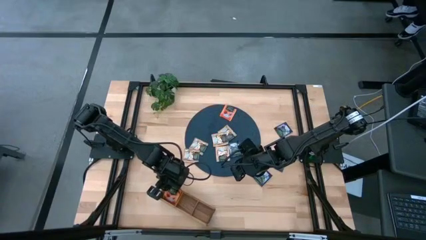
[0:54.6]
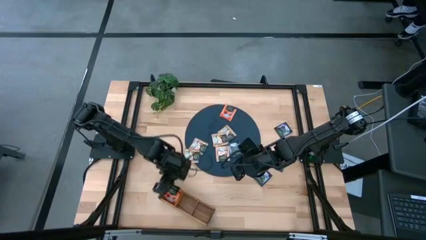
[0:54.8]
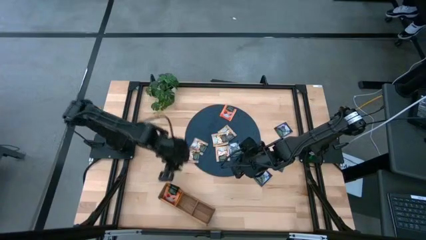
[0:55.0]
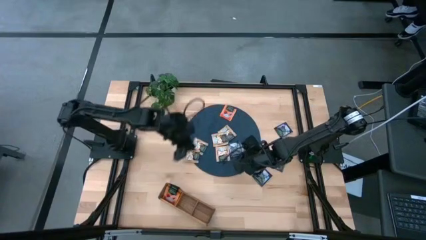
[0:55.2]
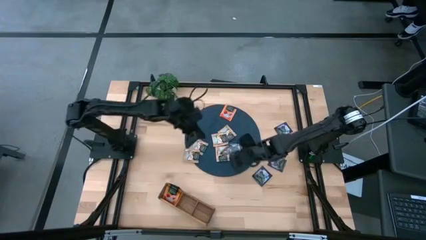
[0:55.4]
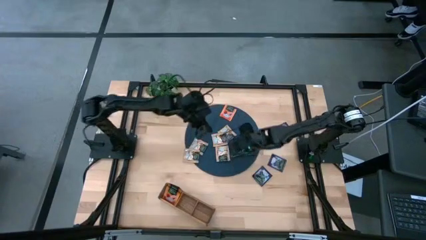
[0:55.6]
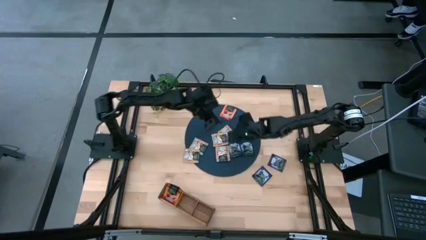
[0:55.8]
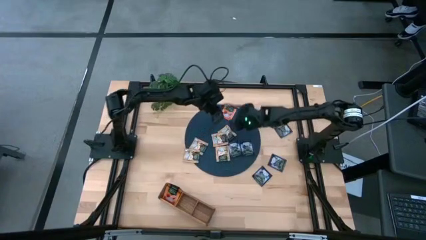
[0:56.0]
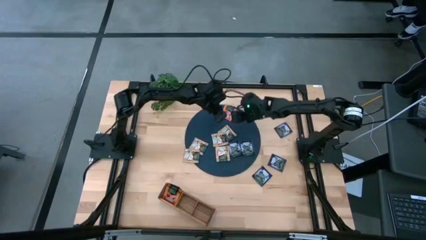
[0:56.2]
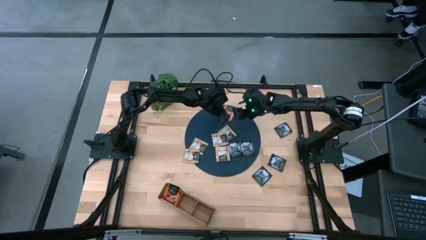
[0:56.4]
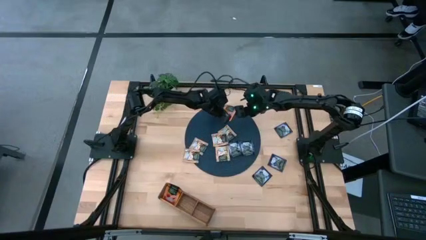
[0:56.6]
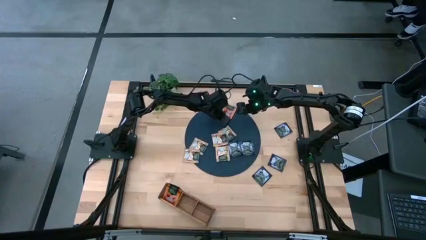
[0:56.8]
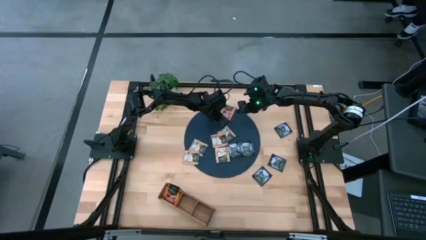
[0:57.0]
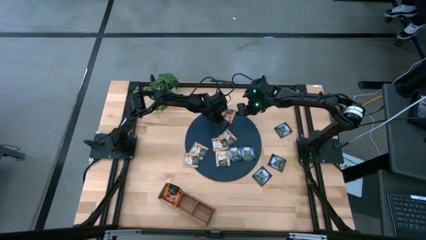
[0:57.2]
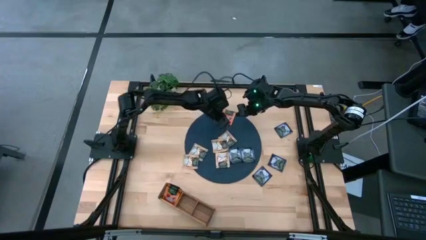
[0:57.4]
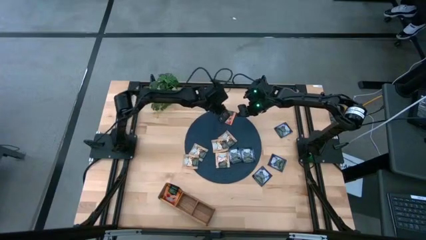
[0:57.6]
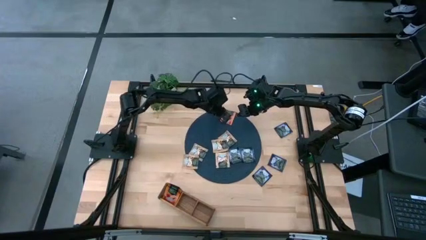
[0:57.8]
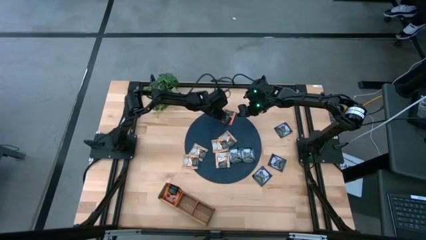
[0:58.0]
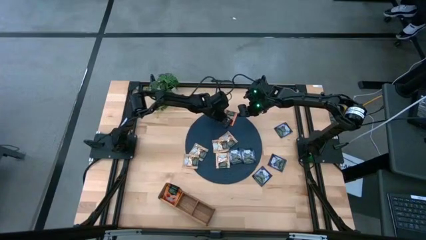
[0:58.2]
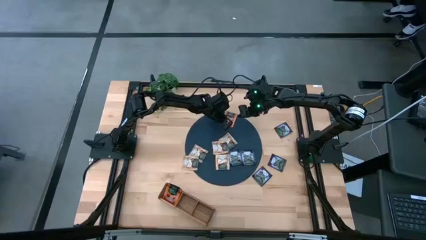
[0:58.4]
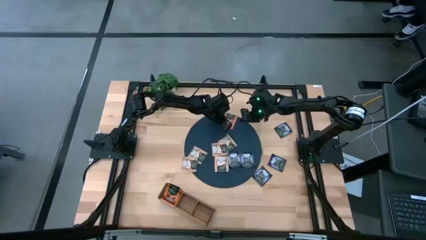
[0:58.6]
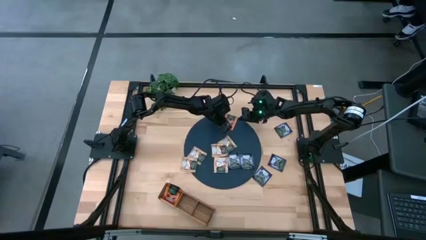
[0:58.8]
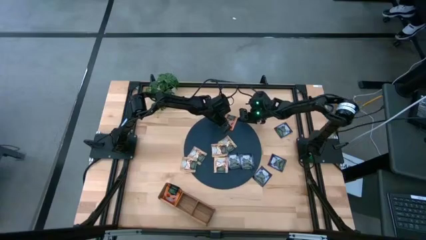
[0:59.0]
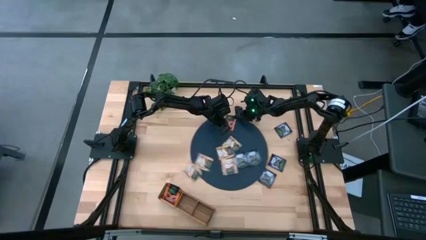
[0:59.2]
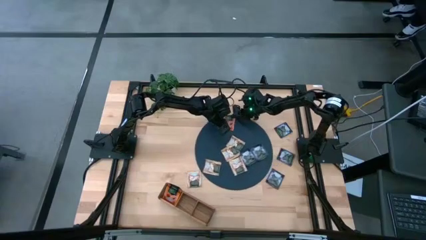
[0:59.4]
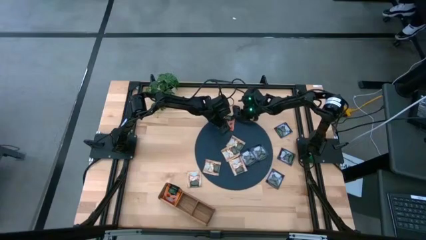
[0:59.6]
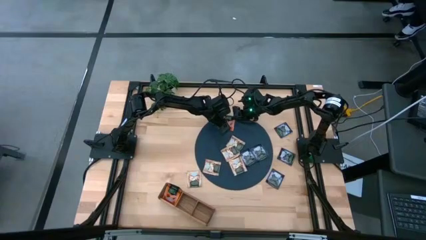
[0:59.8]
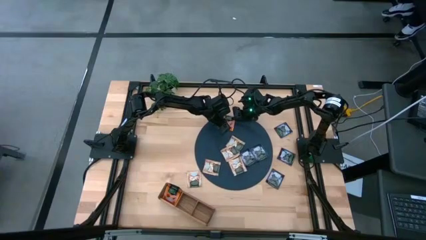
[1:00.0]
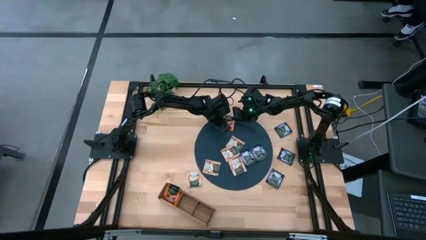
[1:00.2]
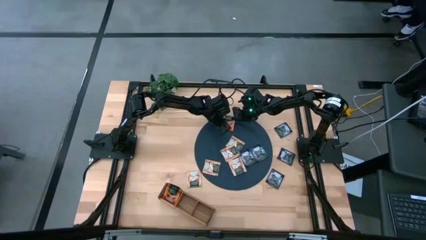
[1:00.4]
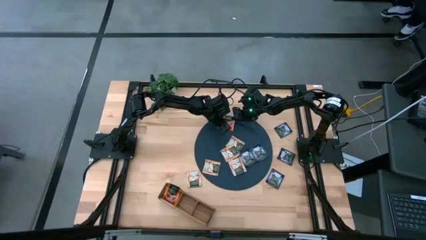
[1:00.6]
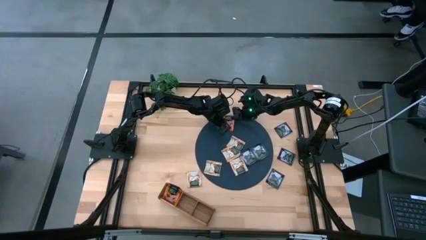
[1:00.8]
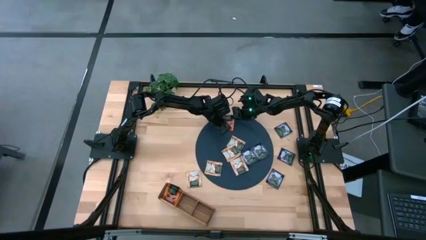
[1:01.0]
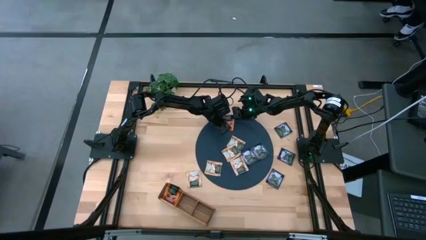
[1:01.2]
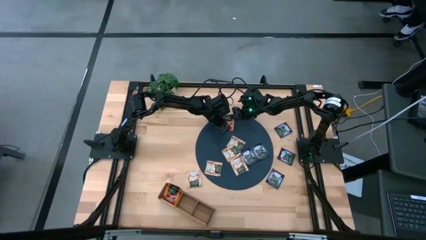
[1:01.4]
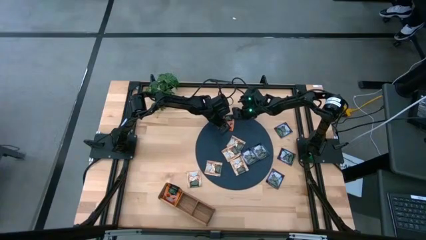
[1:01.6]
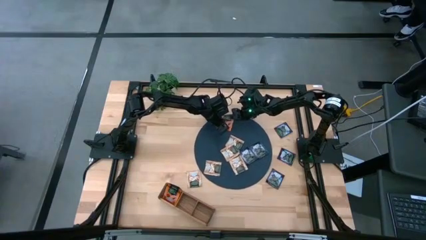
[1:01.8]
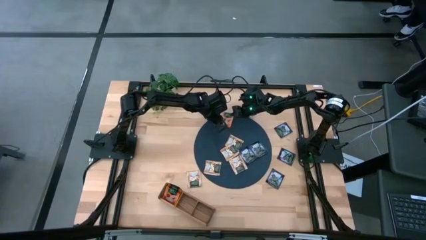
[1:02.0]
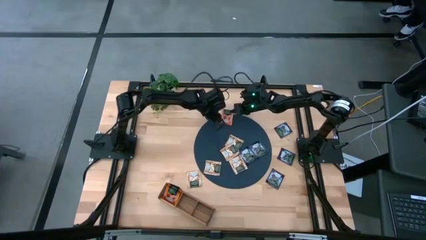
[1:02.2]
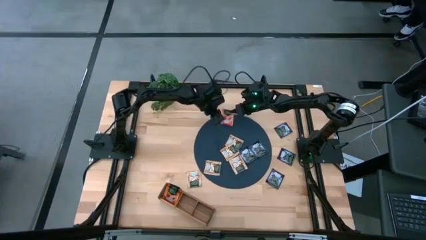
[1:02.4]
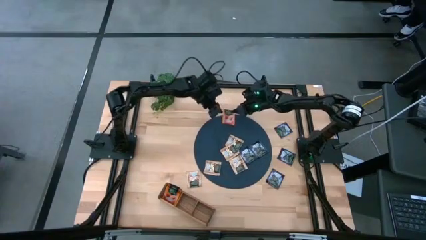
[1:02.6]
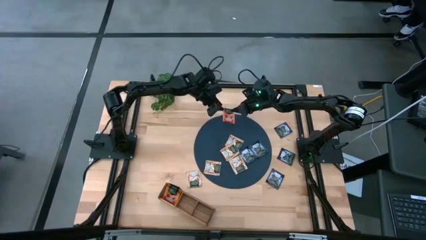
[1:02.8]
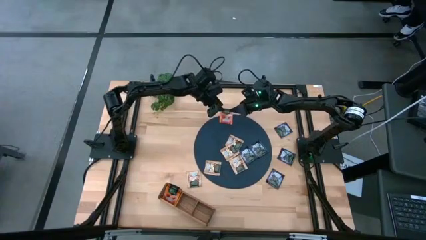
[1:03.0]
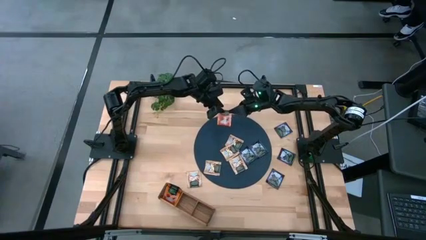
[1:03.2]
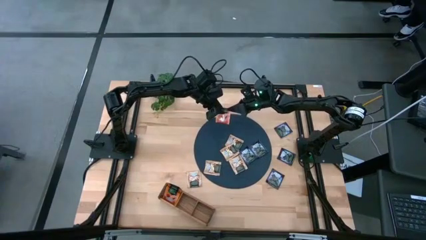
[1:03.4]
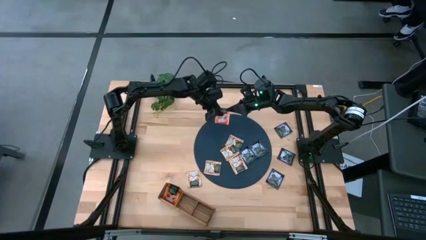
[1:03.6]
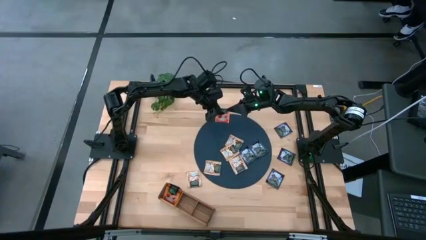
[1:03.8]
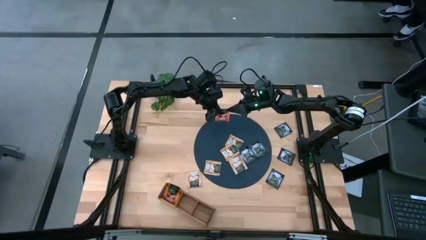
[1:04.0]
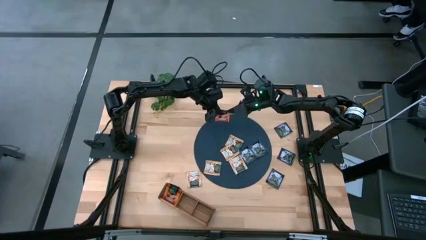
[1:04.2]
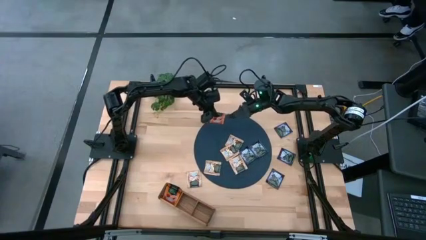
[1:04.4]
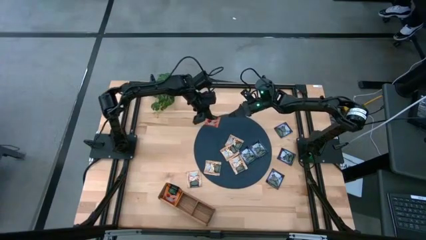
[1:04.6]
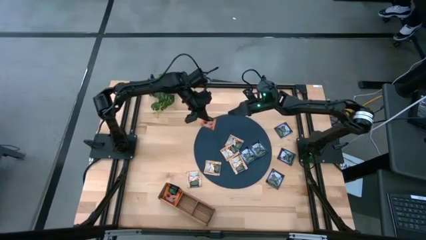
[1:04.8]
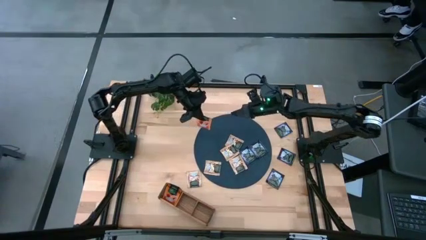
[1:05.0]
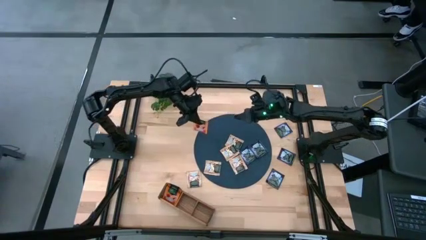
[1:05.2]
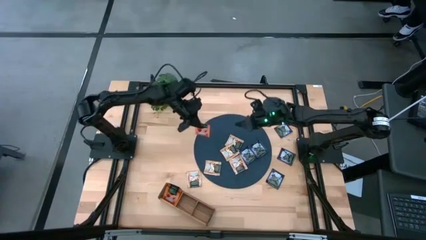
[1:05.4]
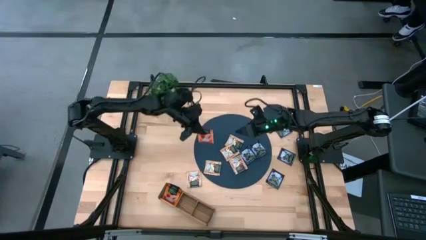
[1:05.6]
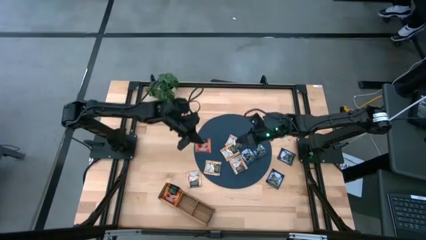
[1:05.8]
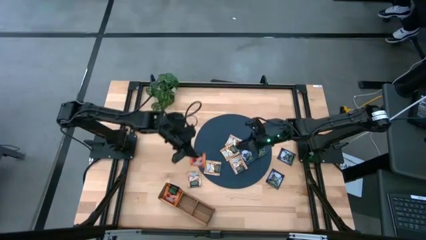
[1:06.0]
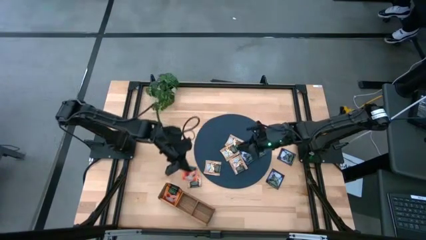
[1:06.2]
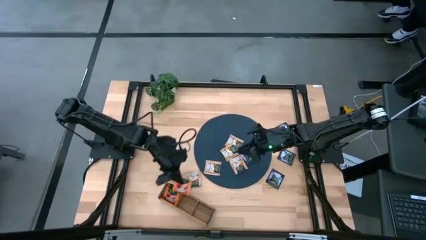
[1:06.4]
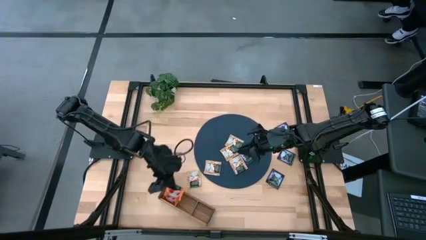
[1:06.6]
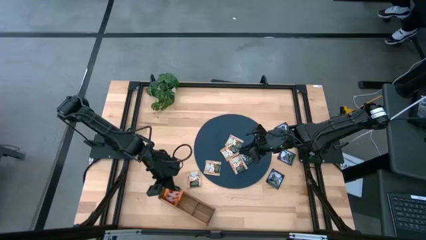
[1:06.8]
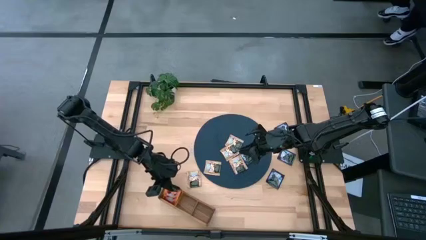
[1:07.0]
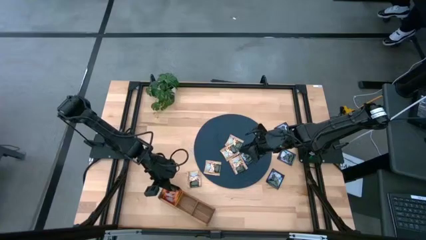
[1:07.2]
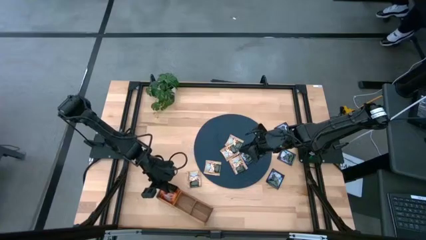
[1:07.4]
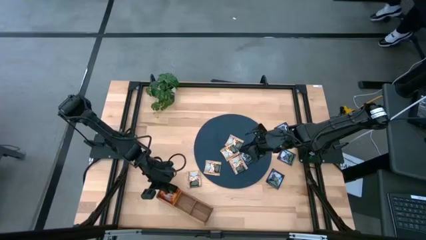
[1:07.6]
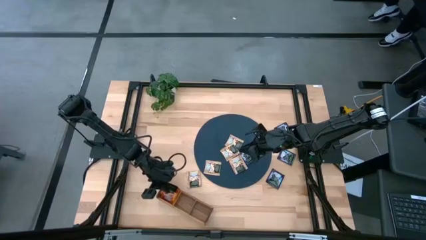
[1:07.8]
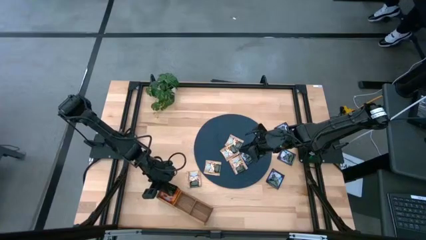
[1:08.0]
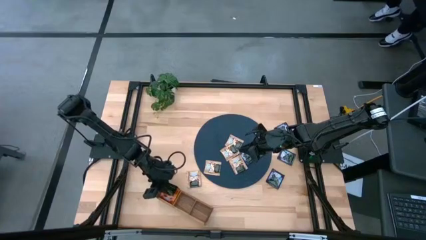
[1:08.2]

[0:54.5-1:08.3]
Task: Pick & Place Tea
Put the orange tea bag into the left section of the wooden organizer
